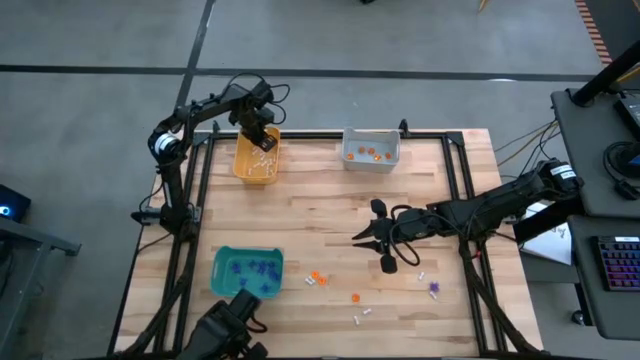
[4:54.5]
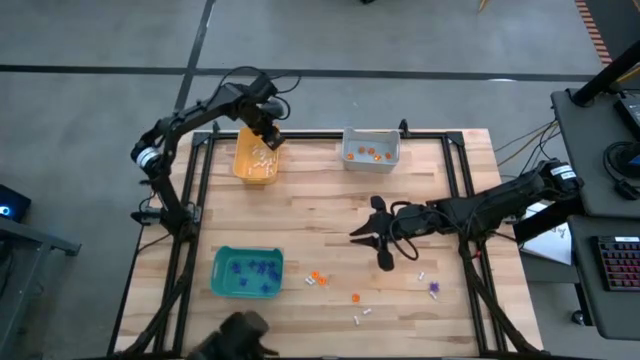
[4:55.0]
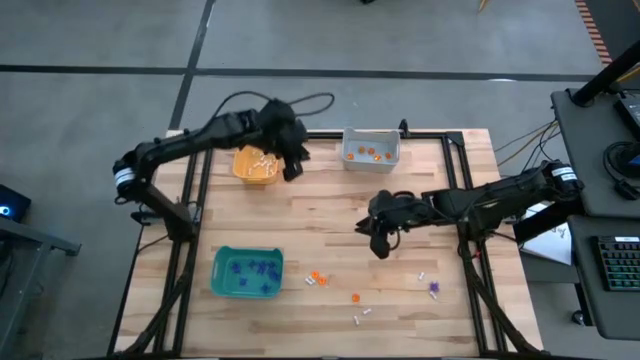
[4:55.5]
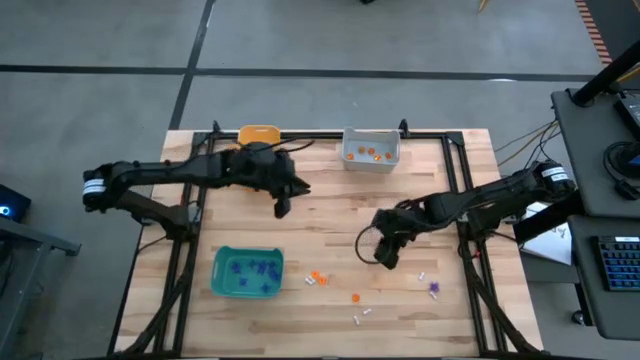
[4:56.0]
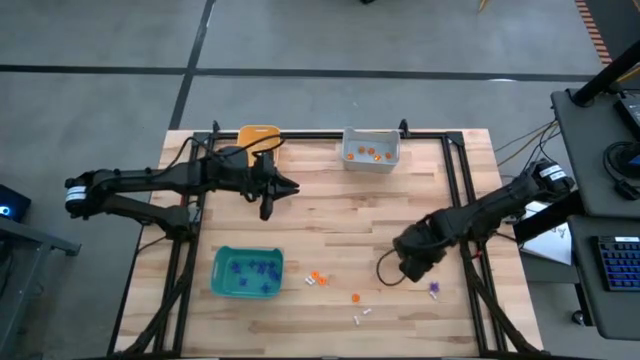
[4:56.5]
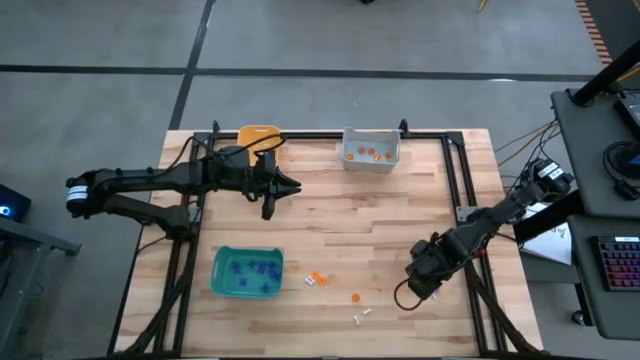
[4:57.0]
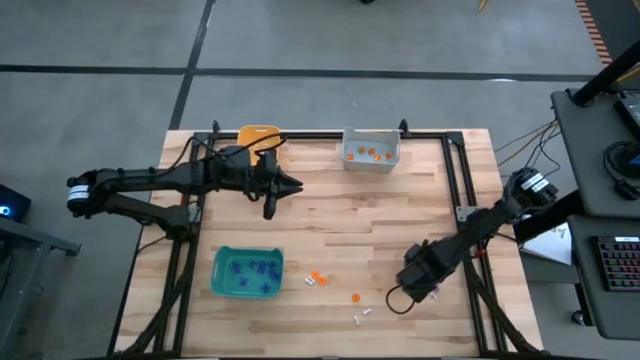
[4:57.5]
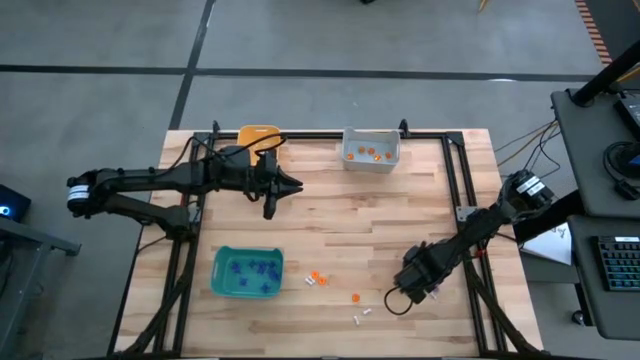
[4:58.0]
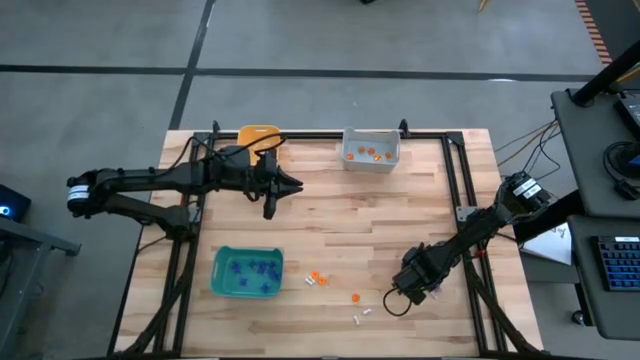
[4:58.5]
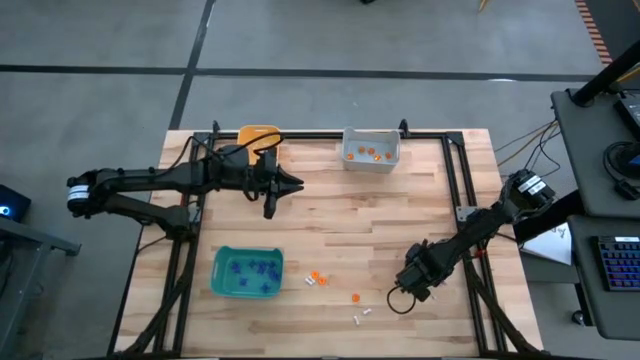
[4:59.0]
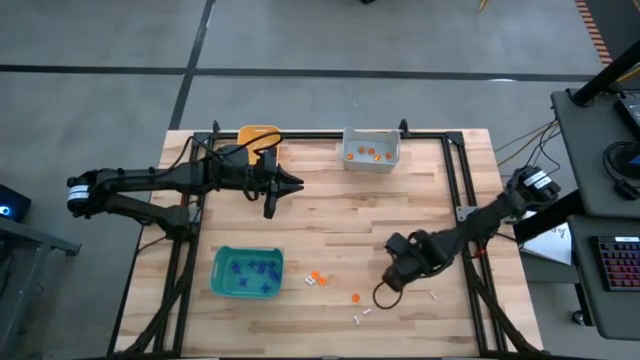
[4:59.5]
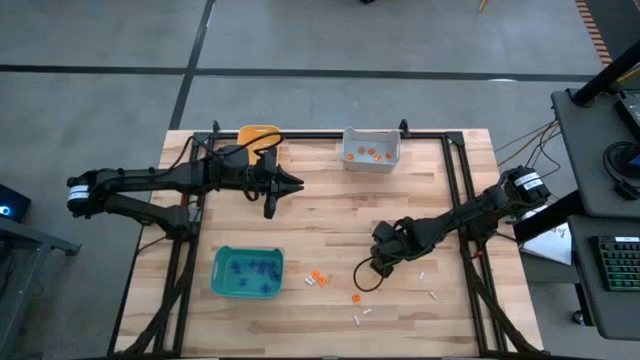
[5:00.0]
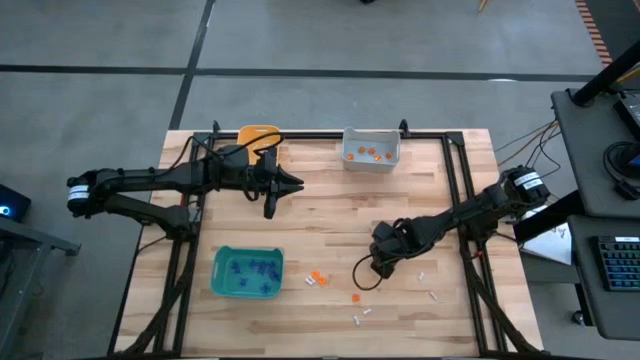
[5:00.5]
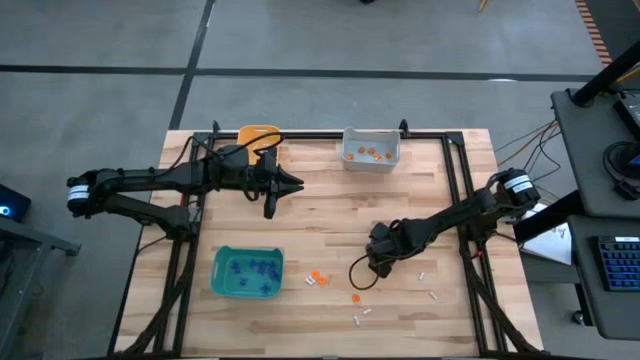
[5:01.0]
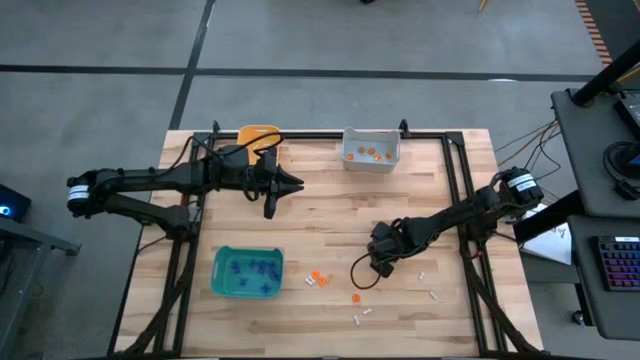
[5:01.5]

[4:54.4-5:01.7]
Task: Sort Halloween decoration
Put the blue spider toy into the green bin

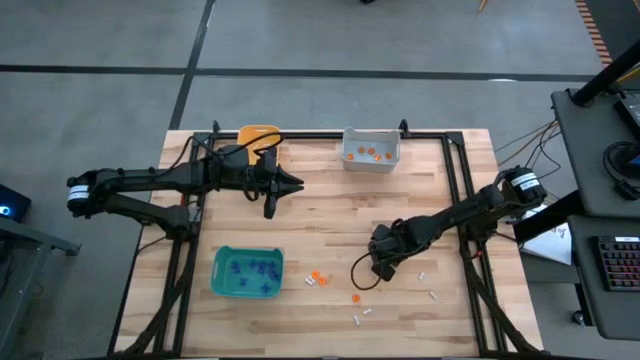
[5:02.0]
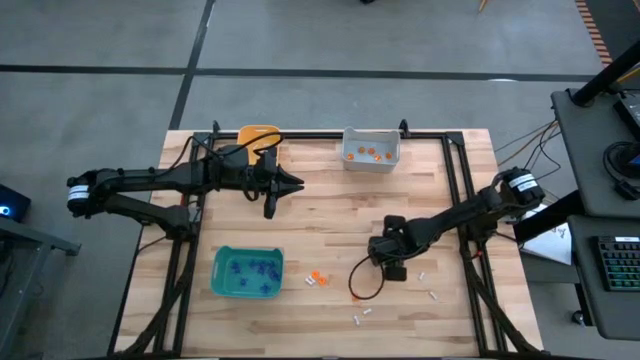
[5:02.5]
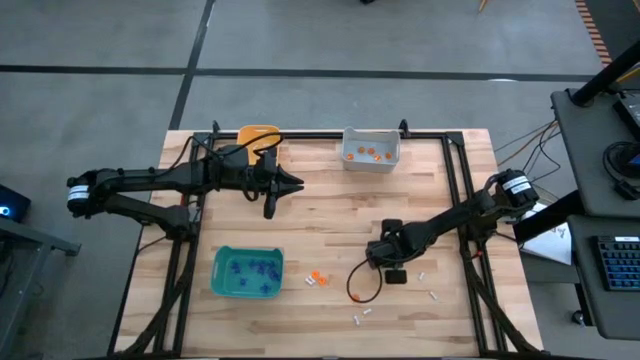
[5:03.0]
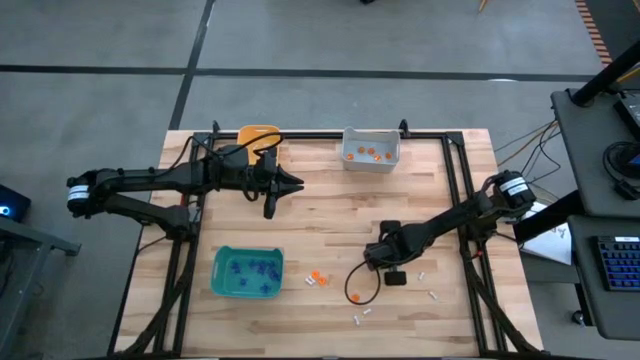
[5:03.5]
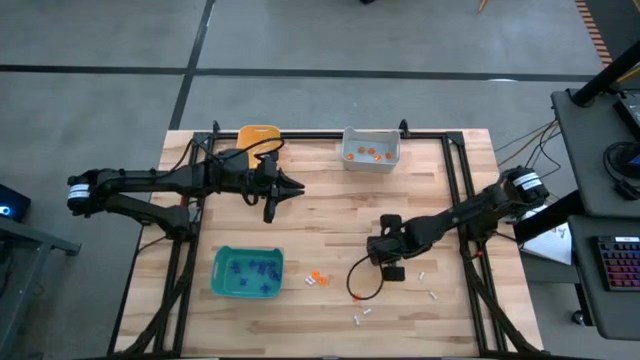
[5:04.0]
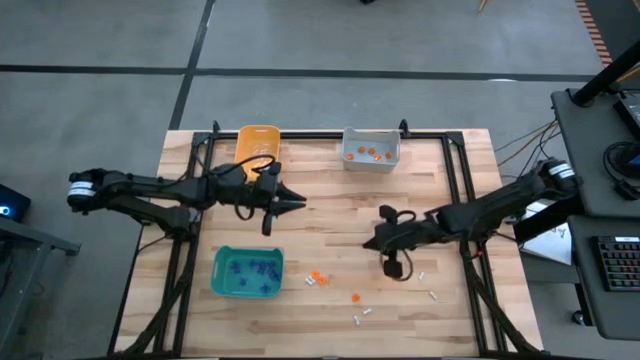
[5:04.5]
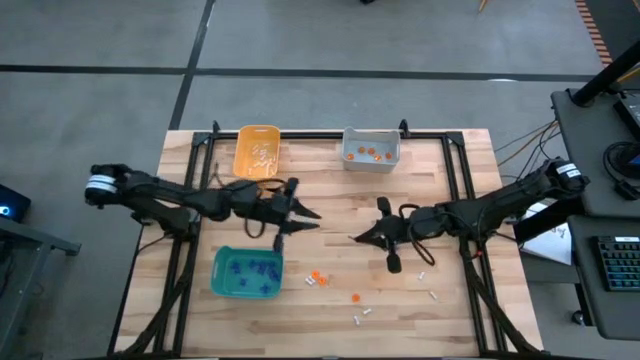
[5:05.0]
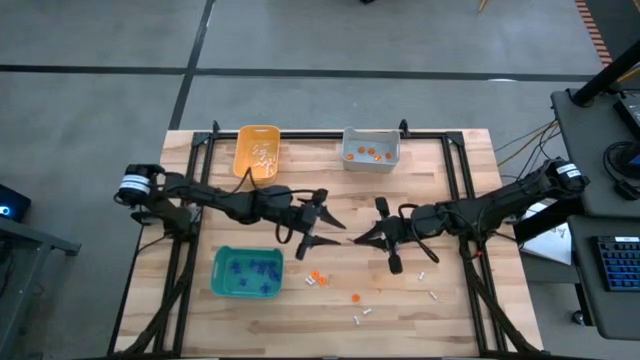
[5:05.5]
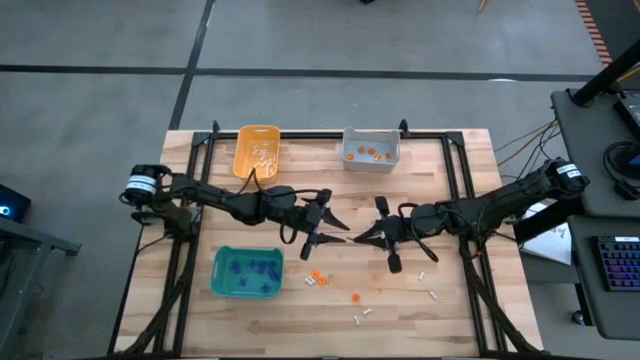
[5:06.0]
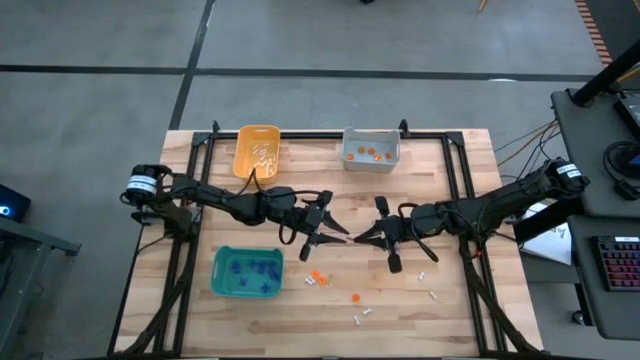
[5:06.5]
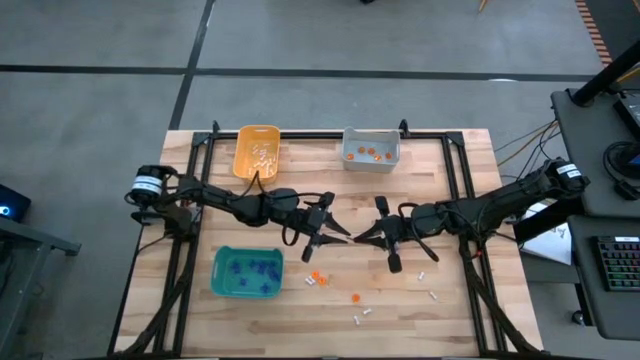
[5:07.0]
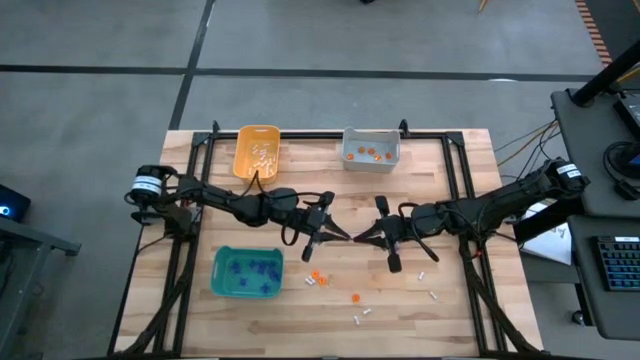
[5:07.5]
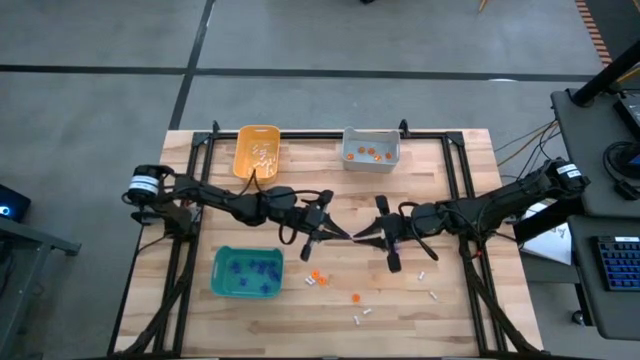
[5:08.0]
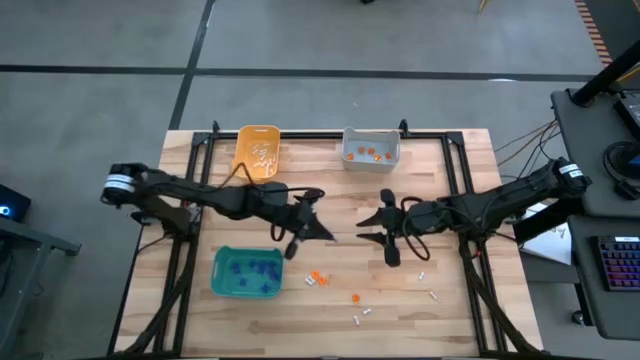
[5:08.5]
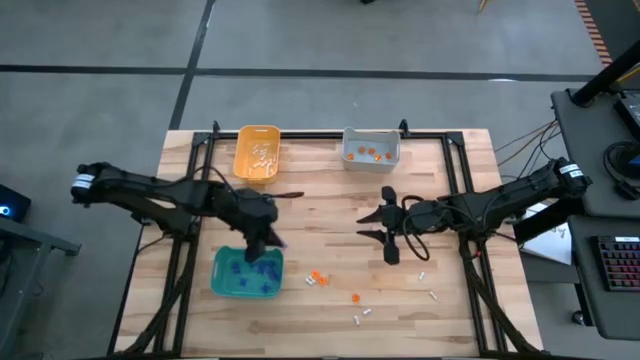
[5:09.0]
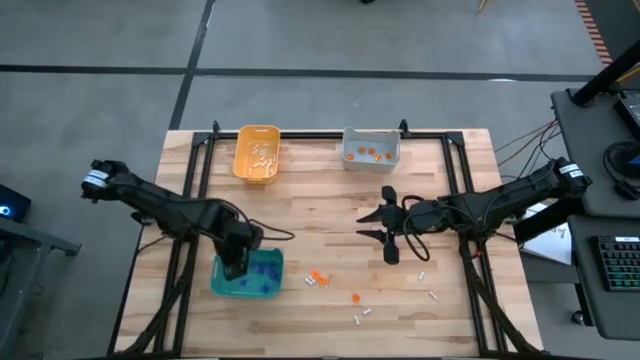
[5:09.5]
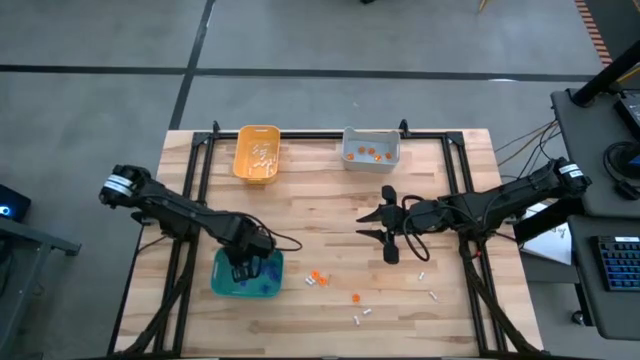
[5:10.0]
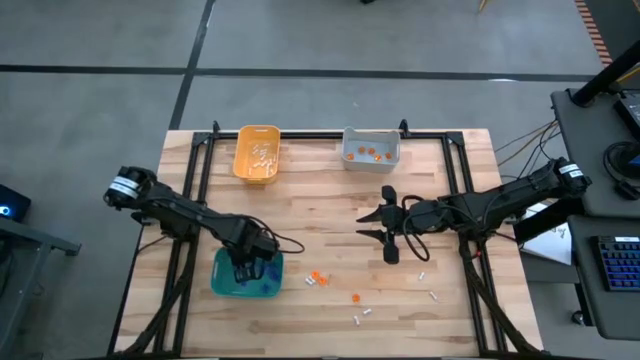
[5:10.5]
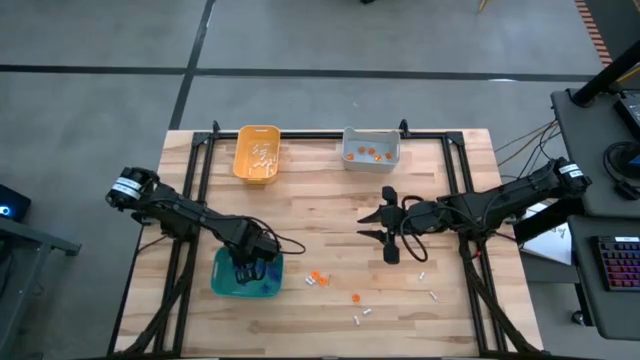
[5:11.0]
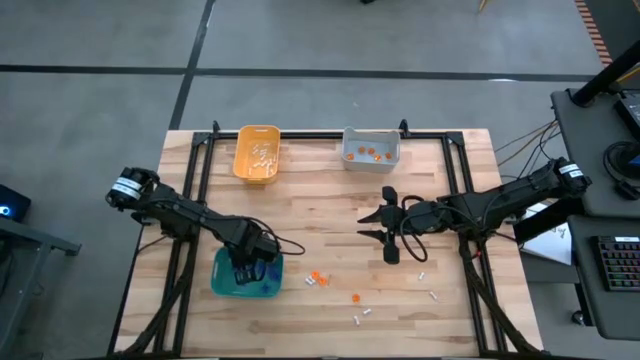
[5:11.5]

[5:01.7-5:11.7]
Put the blue spider toy into the green bin
